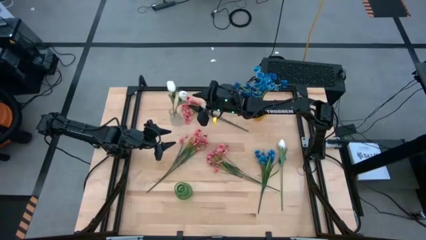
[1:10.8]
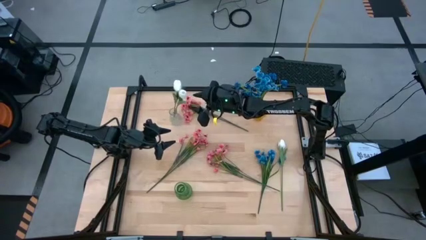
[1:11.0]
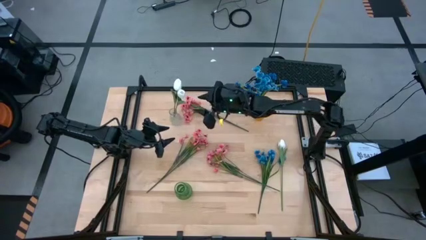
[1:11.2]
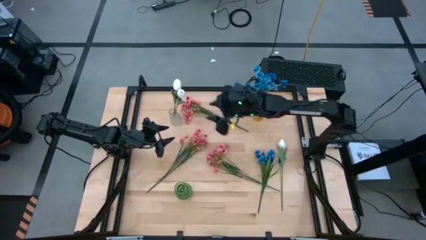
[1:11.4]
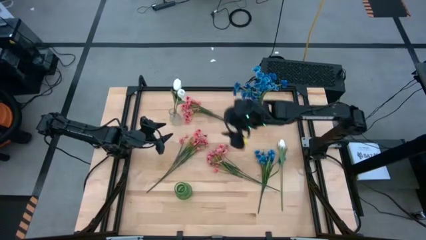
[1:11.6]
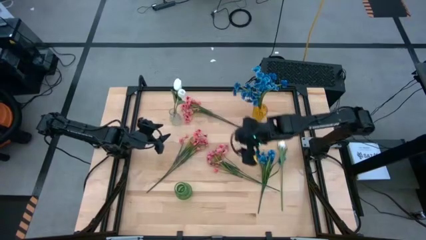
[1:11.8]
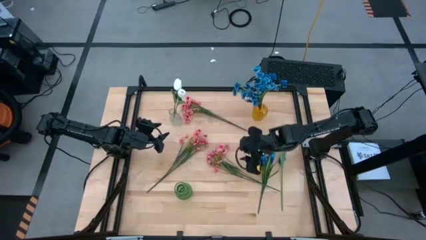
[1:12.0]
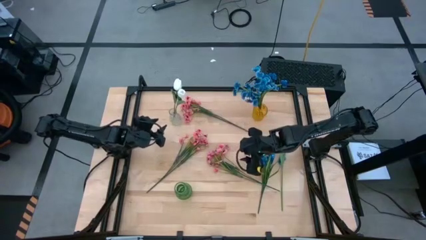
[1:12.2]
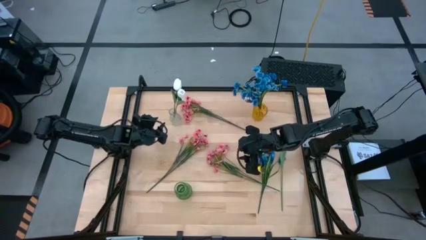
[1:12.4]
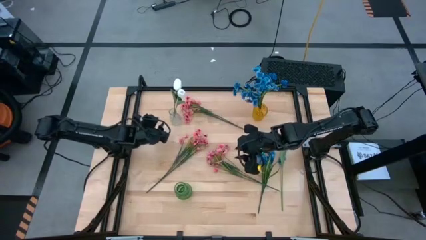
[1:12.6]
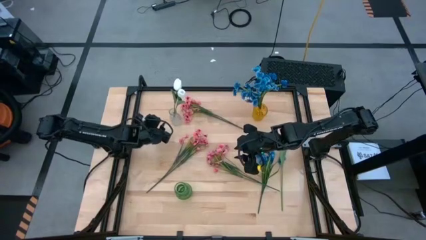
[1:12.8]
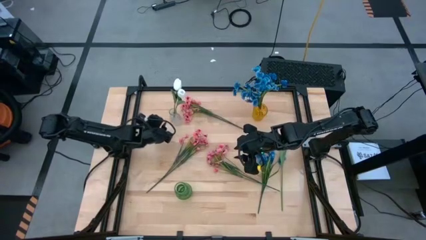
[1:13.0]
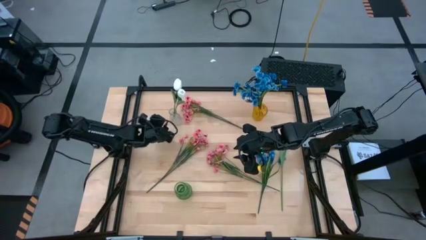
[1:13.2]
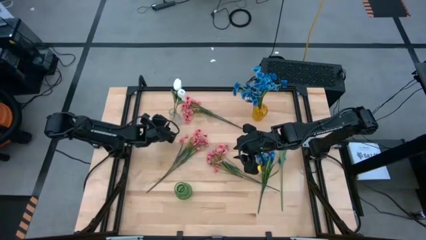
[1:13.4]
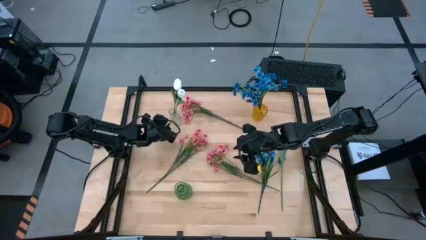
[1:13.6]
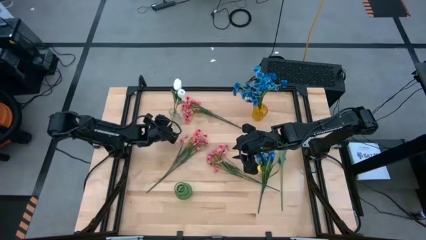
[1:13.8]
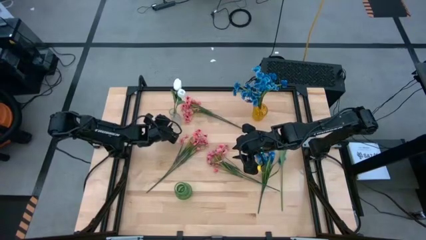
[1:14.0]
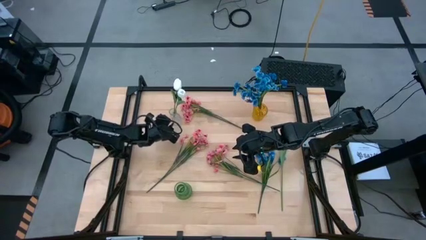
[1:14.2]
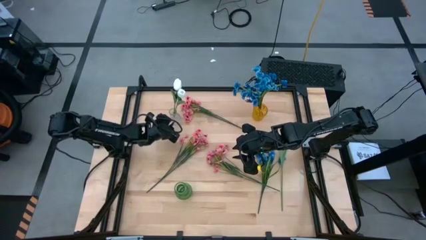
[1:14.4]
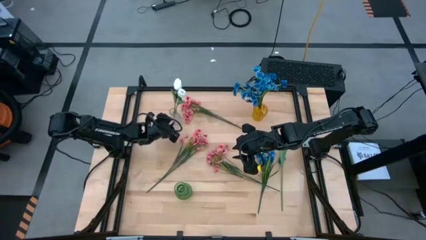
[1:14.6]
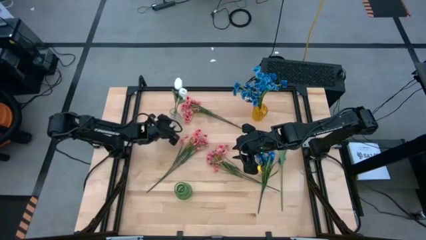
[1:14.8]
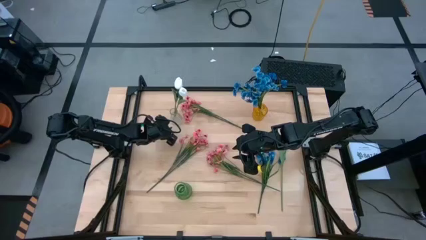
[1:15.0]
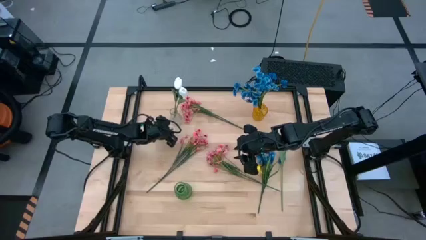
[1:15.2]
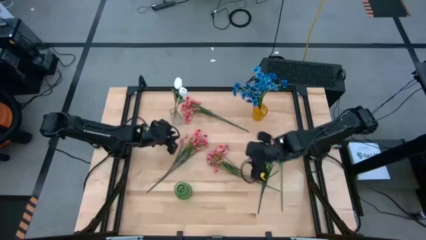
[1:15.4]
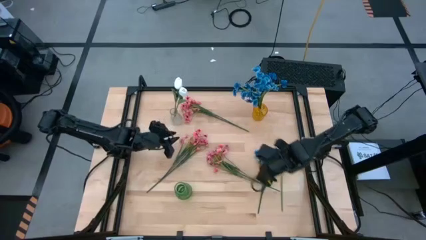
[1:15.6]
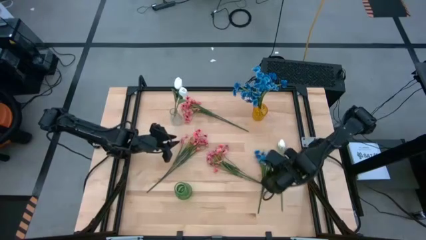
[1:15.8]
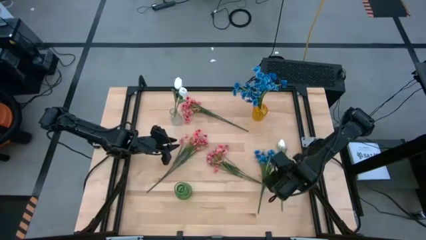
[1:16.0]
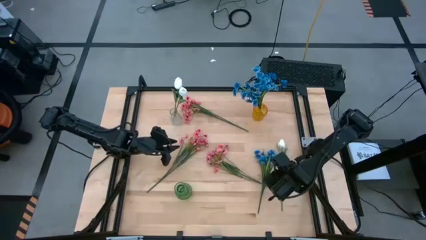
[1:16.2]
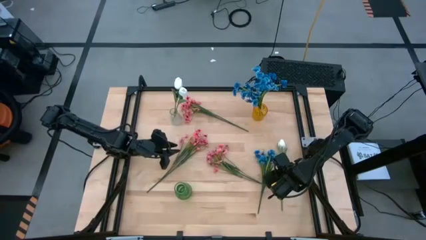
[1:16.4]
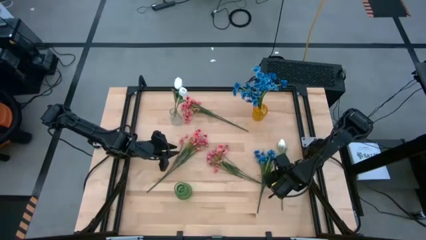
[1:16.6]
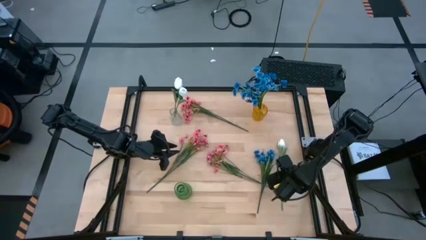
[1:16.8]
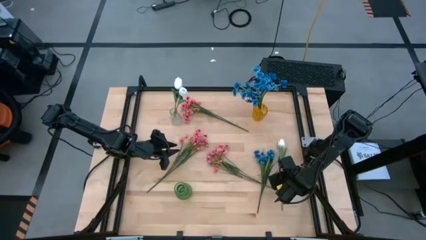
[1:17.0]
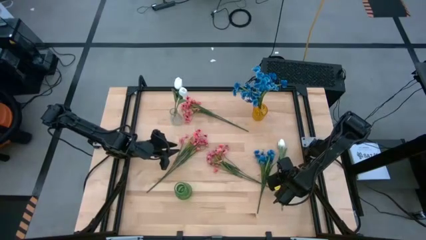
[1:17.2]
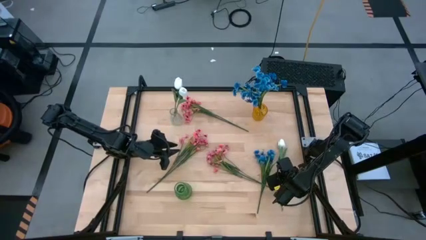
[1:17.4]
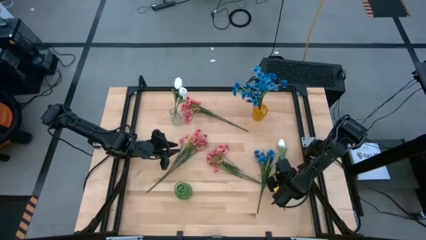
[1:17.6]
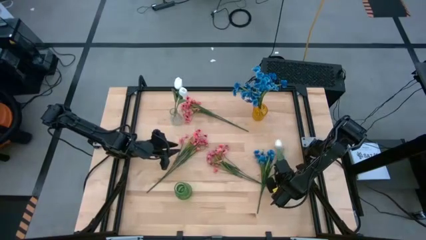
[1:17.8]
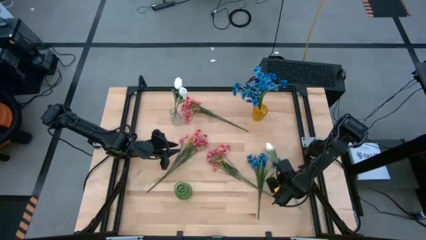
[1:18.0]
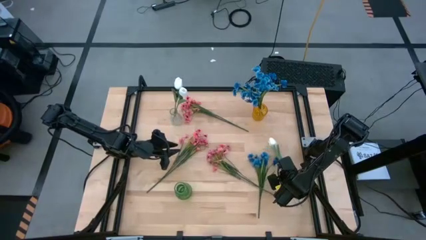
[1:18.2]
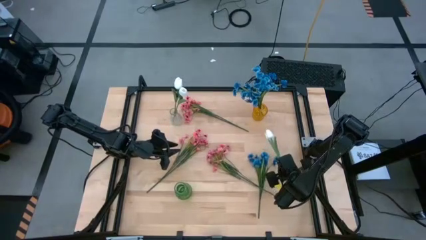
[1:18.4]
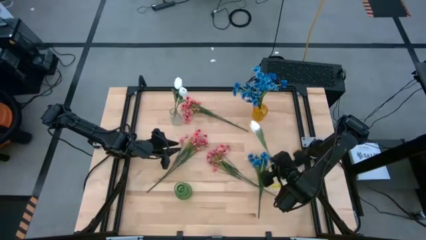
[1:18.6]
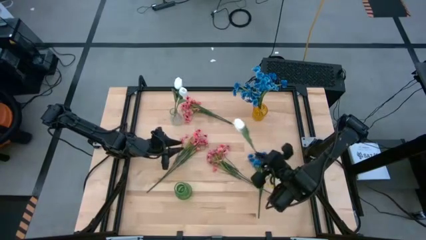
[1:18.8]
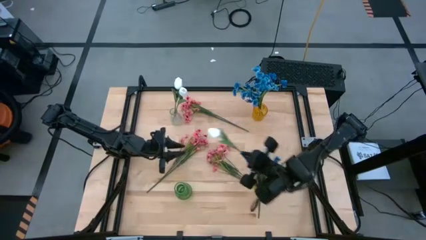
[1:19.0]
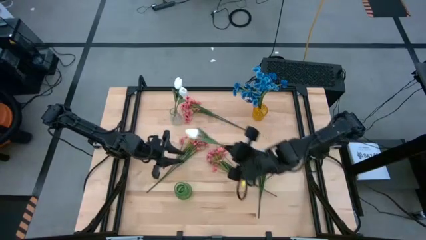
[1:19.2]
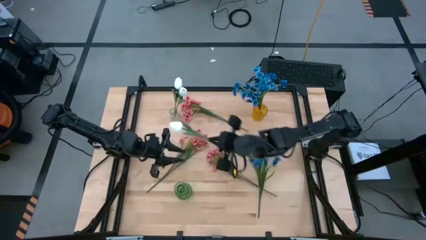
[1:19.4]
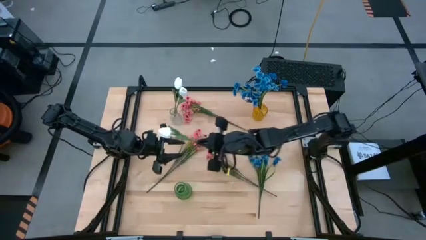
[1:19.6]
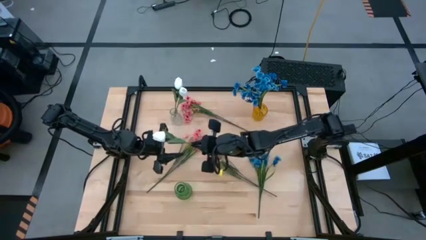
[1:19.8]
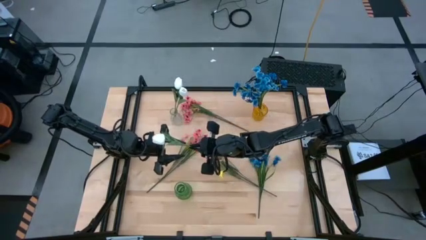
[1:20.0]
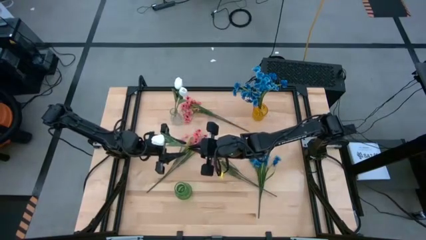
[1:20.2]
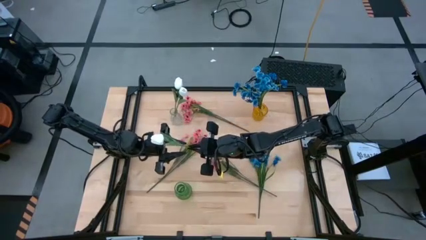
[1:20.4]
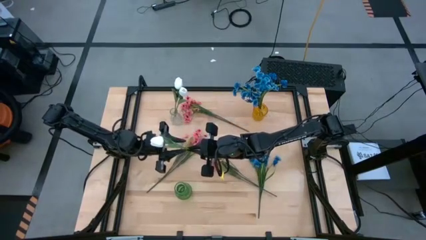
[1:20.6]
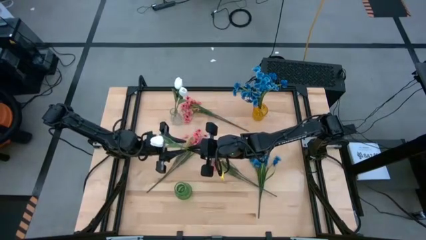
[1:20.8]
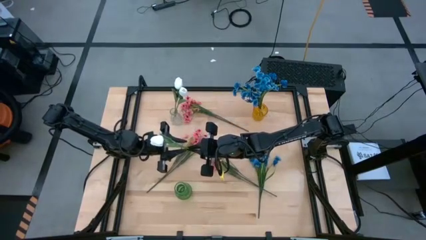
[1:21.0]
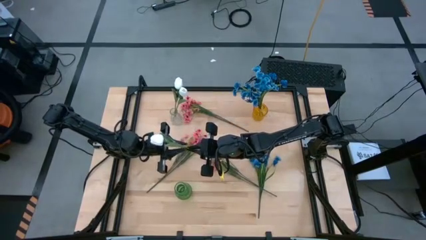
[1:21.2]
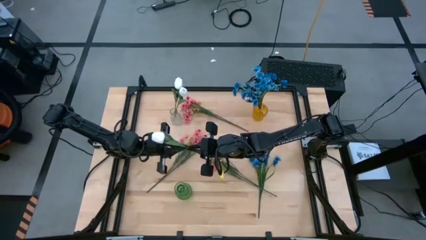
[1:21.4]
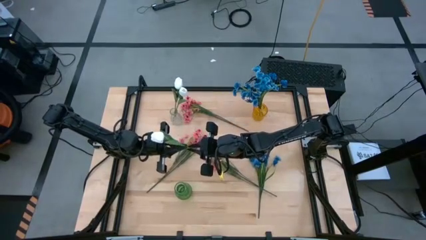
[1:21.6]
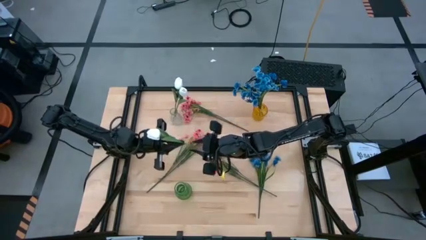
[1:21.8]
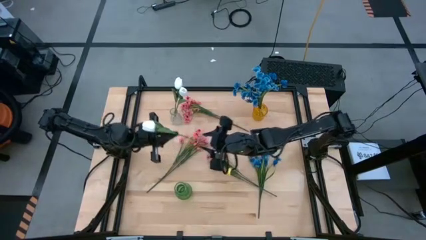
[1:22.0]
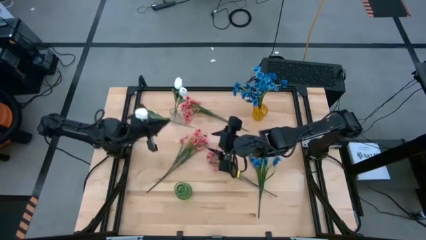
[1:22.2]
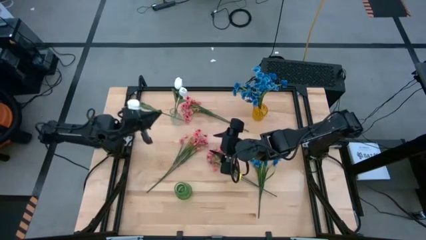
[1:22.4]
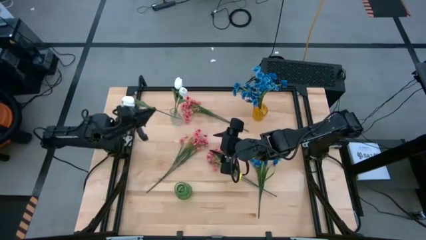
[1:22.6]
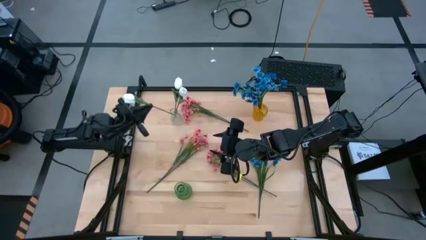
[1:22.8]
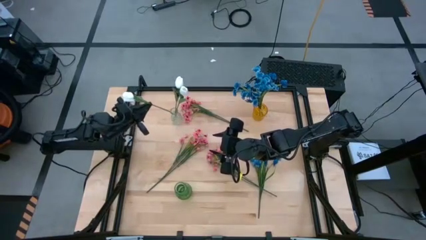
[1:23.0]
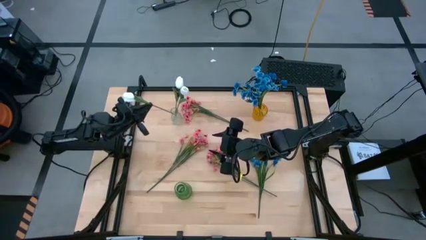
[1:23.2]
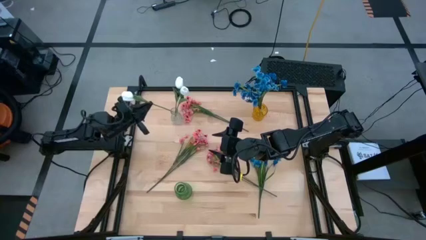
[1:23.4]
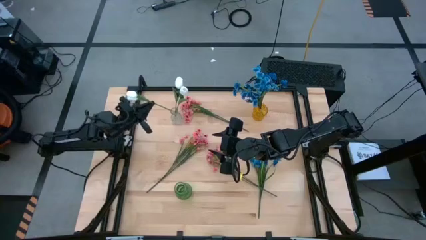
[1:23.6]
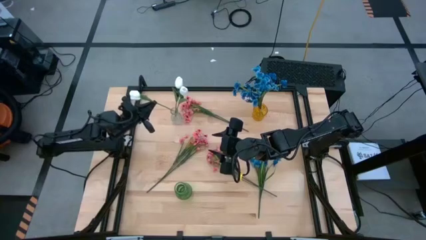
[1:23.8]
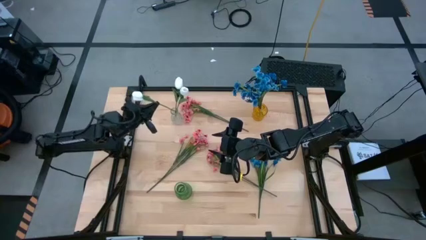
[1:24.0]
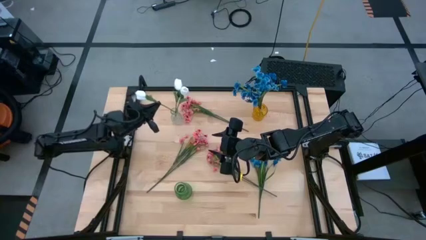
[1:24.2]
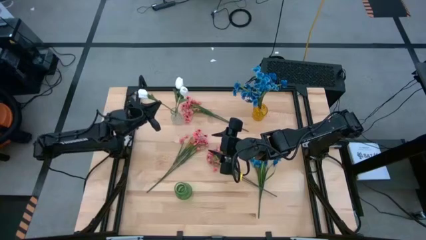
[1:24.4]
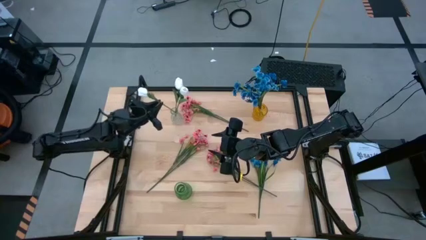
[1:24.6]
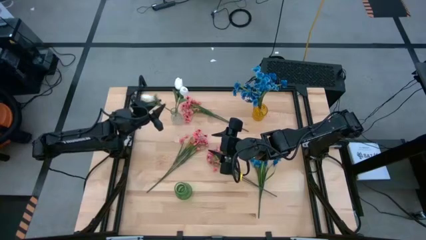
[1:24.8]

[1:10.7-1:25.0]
Task: Sort flowers into vase by color
Put the white flower into the transparent vase
